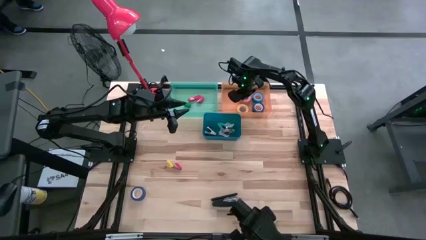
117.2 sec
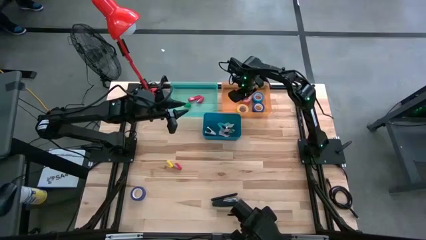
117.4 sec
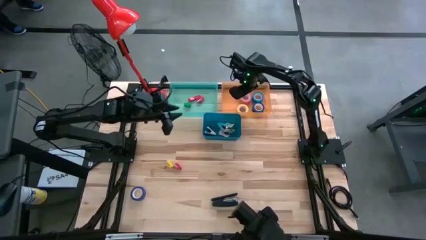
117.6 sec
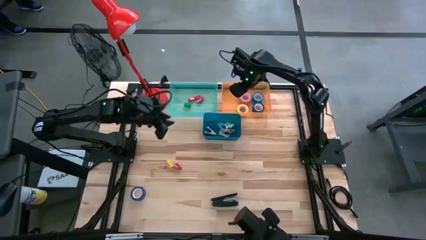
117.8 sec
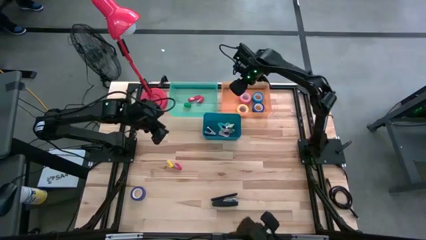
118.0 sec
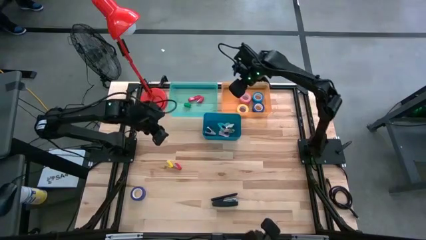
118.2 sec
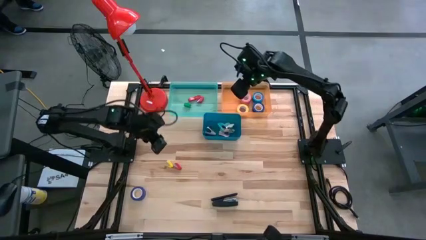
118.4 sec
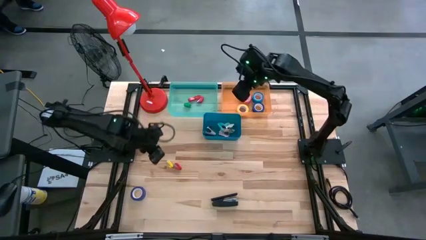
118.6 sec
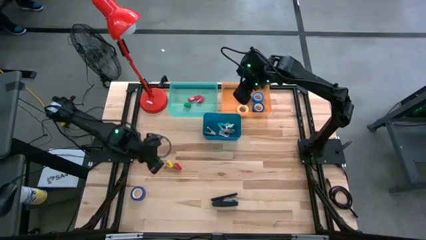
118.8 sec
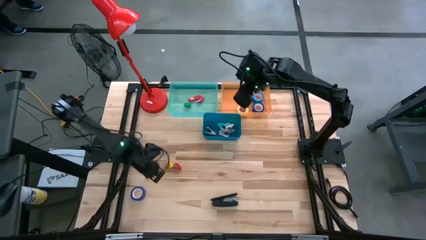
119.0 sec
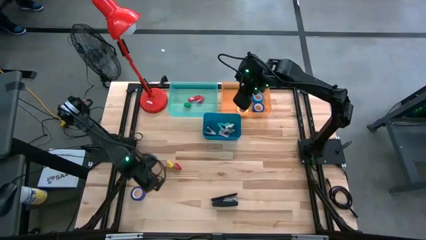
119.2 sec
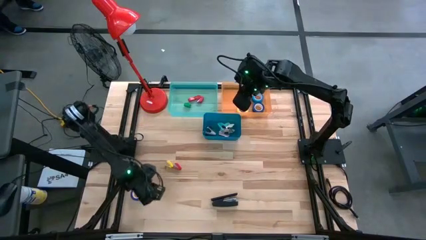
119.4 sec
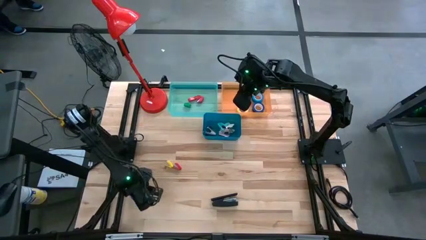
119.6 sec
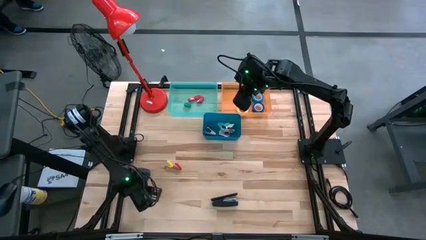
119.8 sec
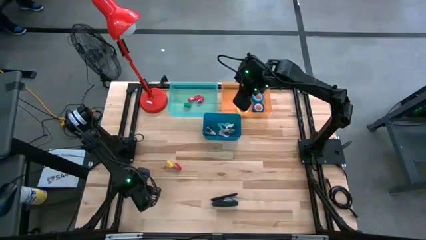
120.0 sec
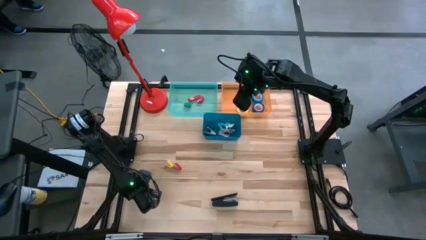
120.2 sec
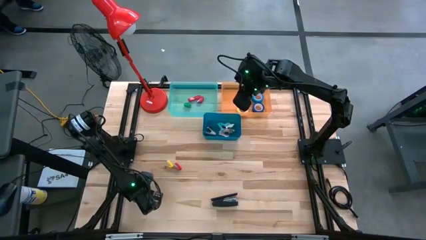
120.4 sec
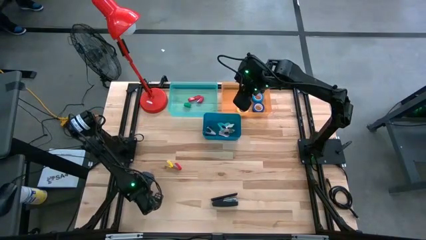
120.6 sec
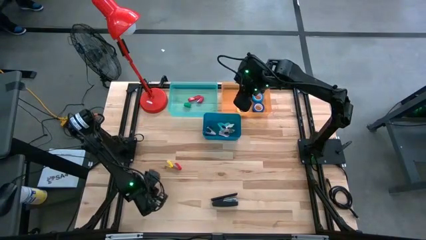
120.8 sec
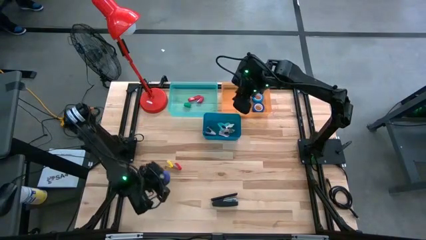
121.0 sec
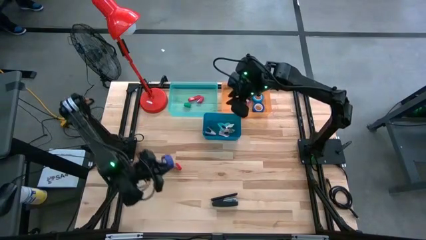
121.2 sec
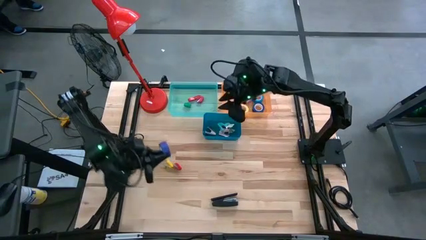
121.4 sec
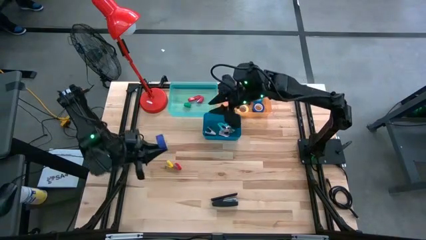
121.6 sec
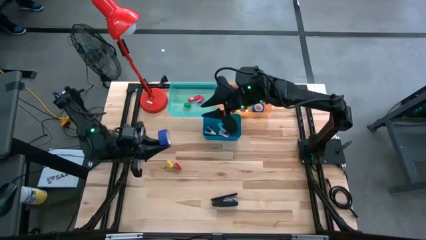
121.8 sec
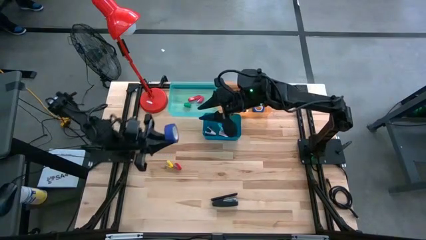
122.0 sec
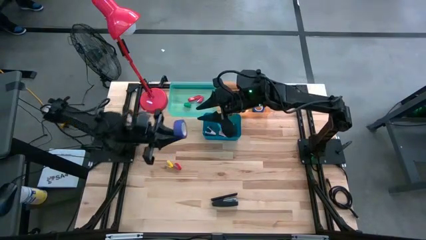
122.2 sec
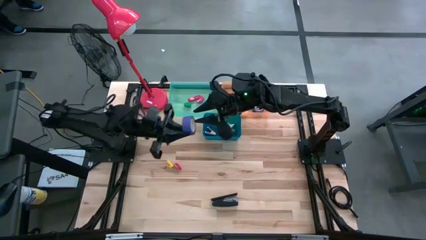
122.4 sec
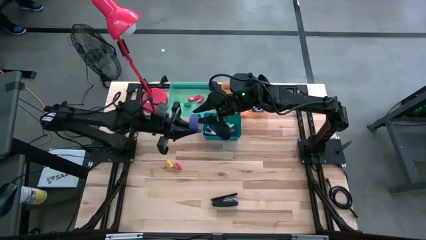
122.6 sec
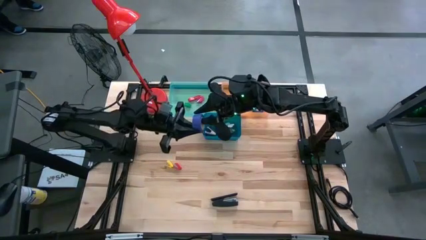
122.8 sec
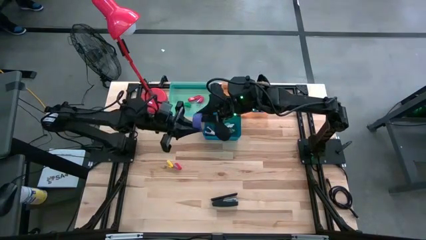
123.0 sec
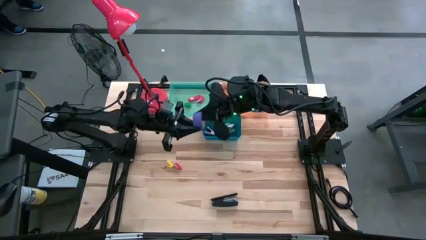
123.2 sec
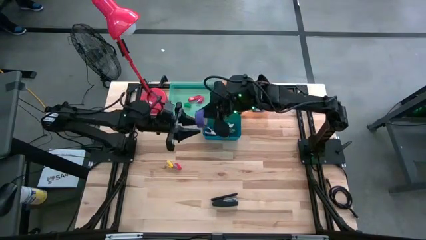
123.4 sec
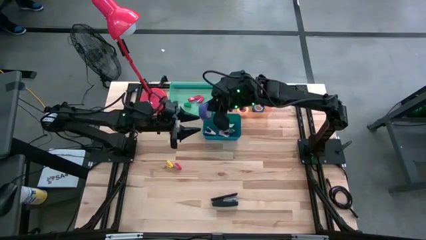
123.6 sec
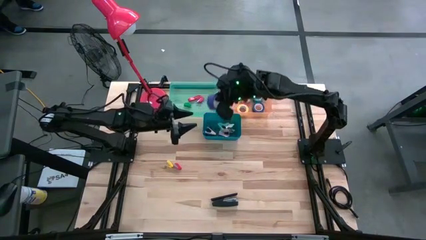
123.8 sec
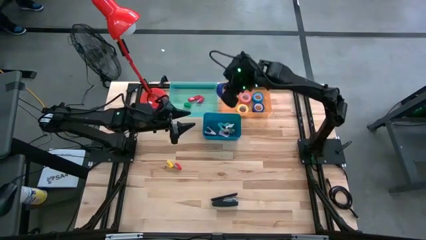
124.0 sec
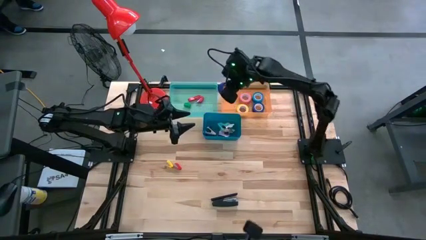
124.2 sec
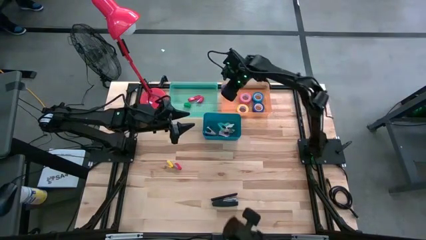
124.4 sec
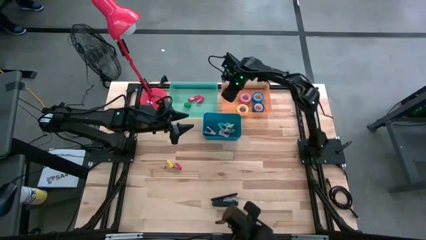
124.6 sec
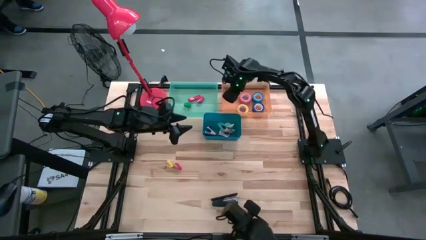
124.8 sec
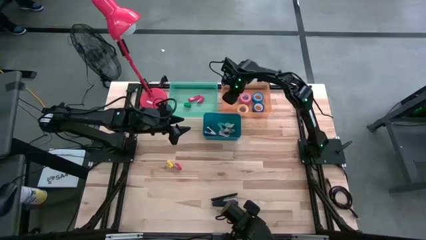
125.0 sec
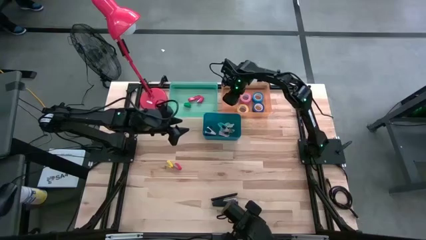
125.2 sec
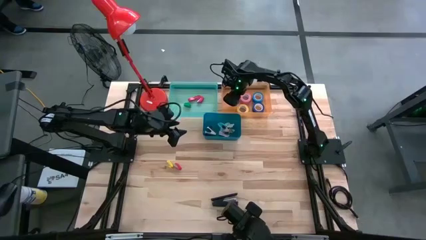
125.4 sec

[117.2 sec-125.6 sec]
Task: Pick and place Stapler, Stapler remover, tape
Put the blue tape in the orange bin

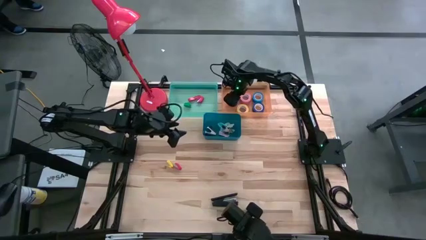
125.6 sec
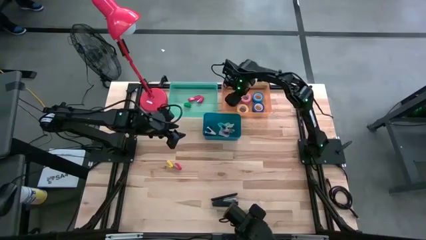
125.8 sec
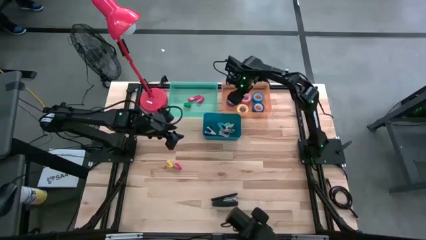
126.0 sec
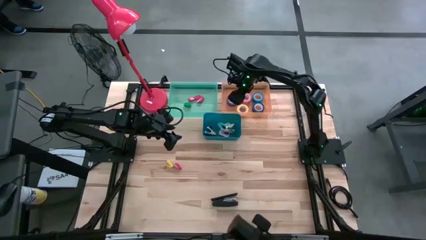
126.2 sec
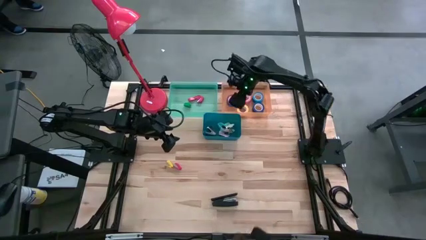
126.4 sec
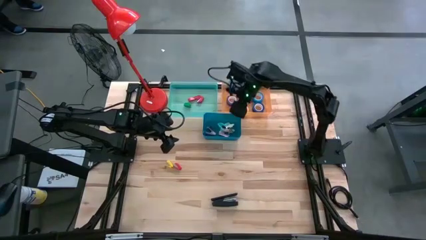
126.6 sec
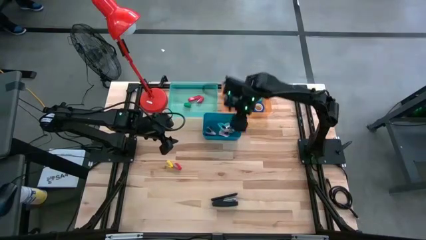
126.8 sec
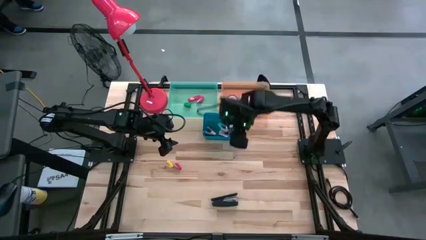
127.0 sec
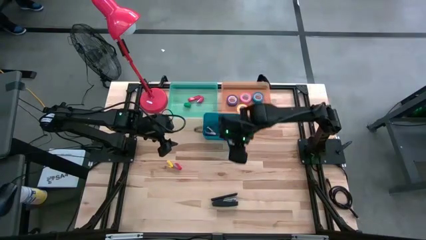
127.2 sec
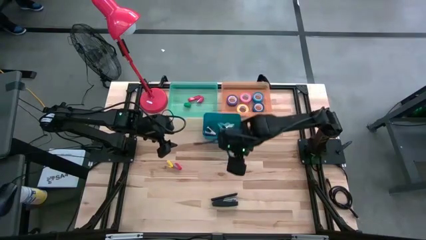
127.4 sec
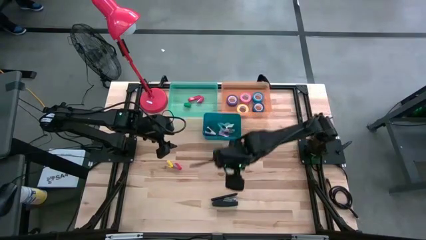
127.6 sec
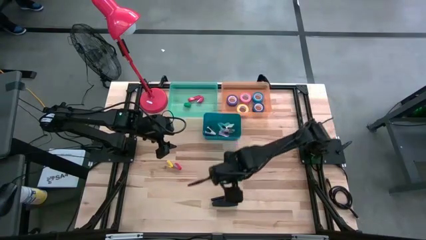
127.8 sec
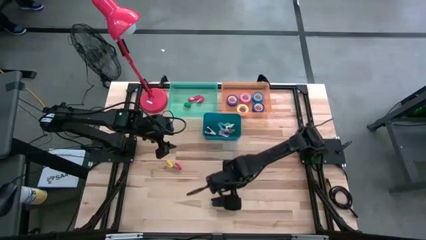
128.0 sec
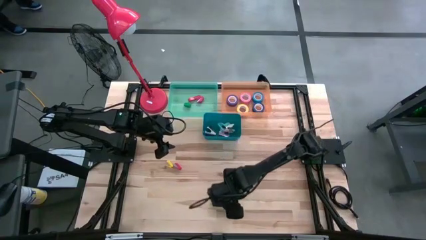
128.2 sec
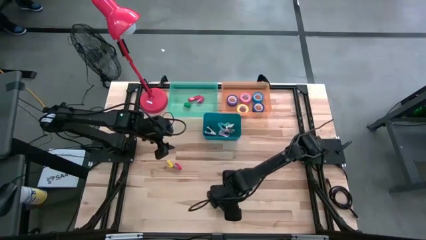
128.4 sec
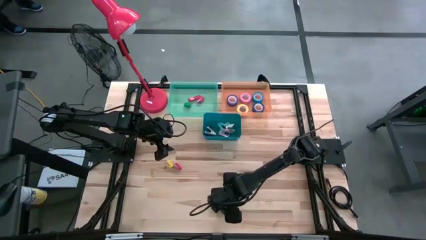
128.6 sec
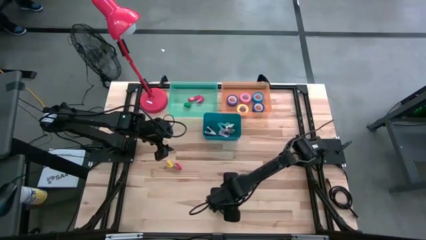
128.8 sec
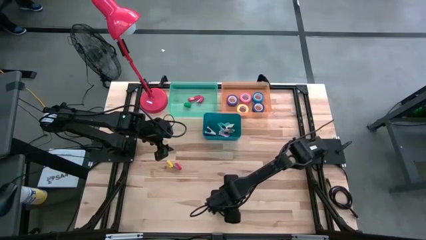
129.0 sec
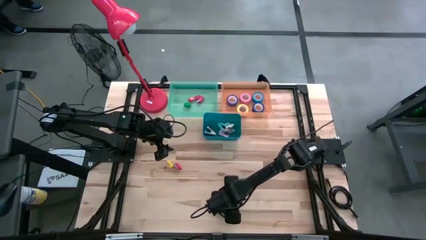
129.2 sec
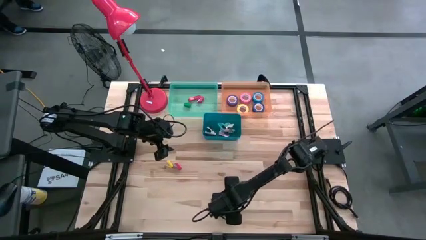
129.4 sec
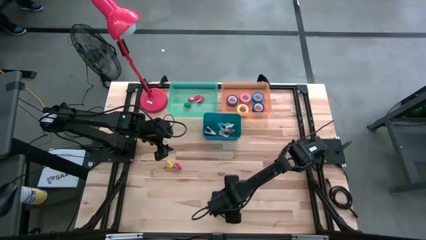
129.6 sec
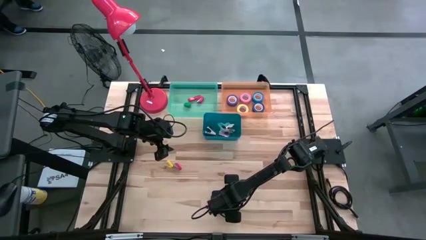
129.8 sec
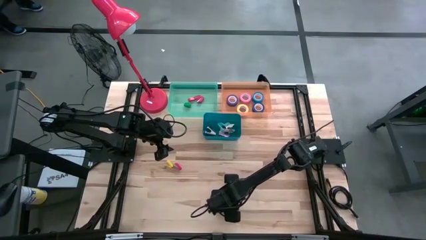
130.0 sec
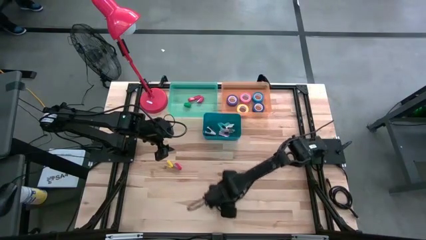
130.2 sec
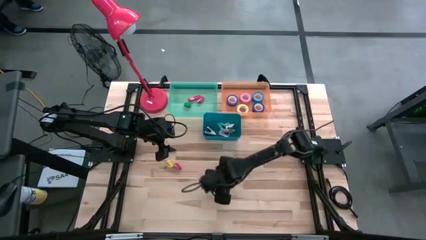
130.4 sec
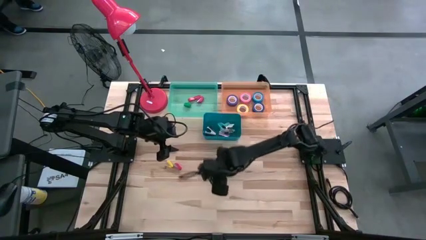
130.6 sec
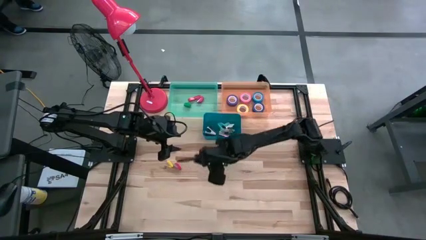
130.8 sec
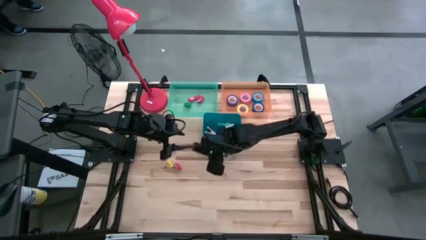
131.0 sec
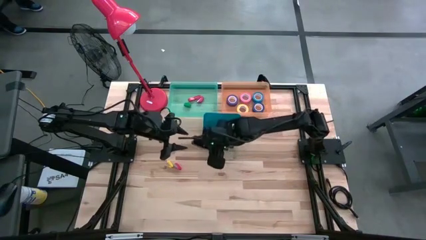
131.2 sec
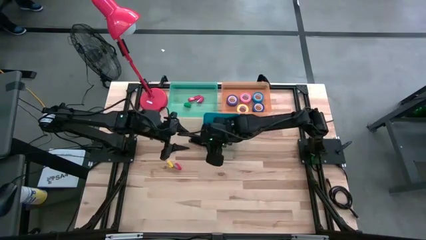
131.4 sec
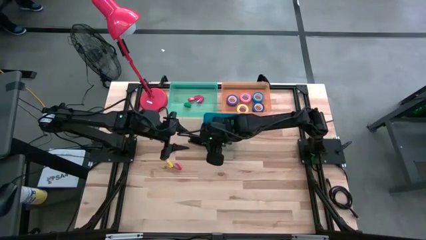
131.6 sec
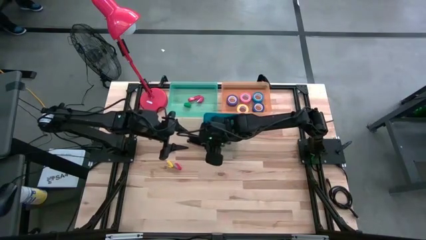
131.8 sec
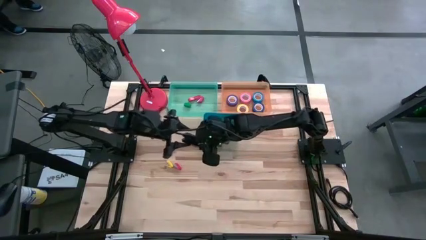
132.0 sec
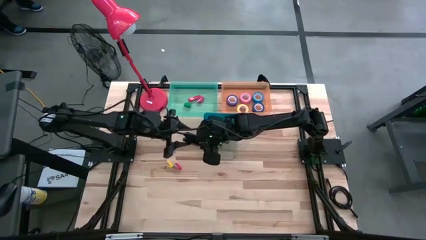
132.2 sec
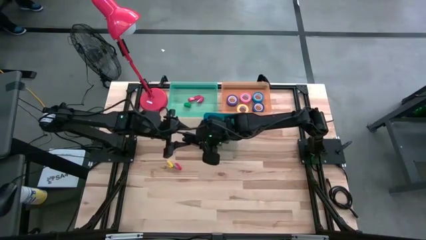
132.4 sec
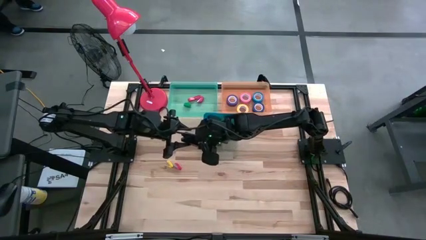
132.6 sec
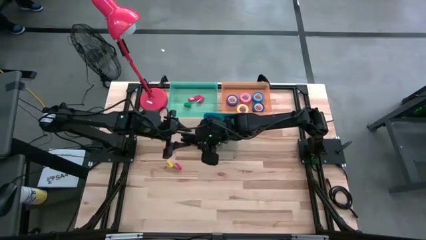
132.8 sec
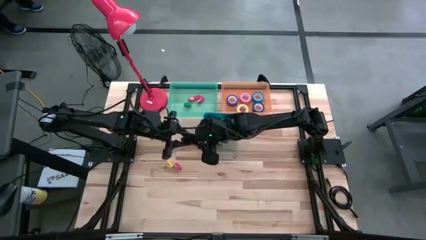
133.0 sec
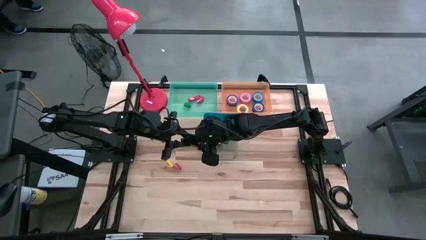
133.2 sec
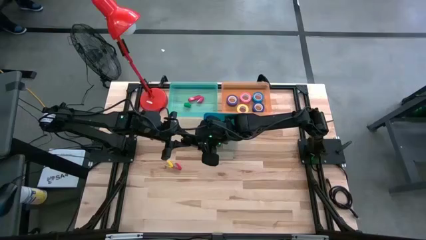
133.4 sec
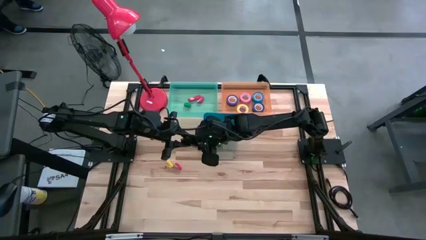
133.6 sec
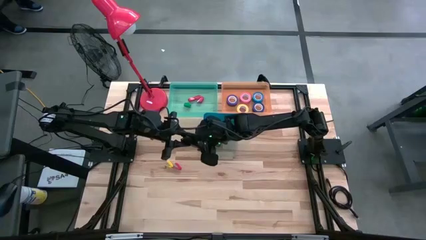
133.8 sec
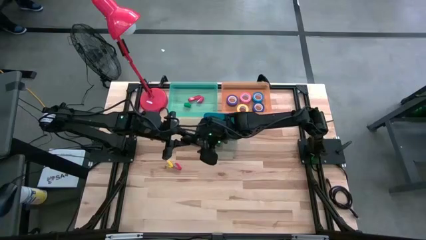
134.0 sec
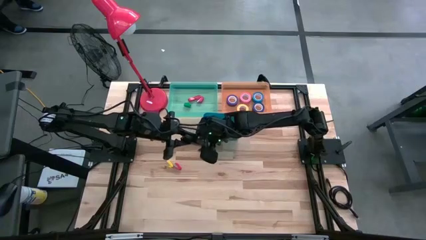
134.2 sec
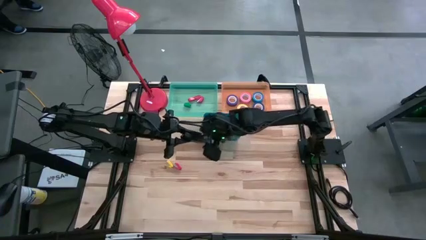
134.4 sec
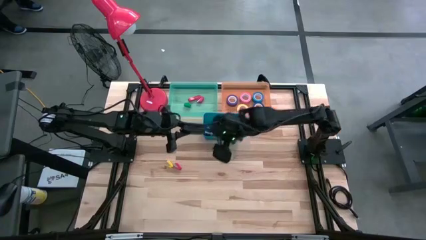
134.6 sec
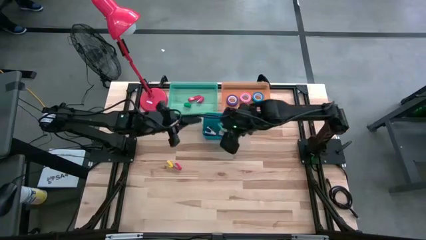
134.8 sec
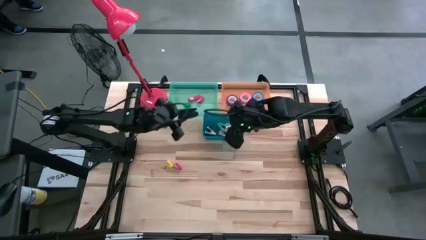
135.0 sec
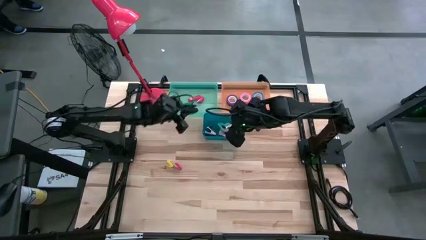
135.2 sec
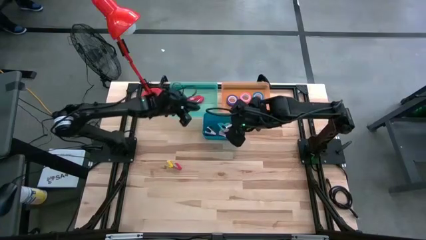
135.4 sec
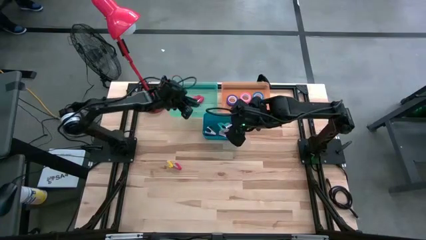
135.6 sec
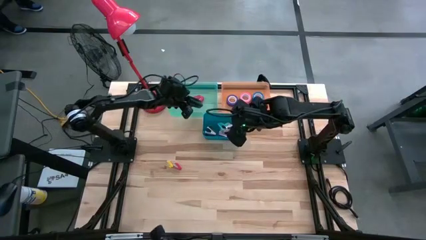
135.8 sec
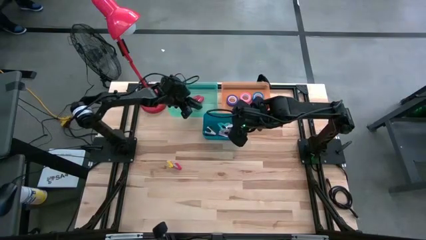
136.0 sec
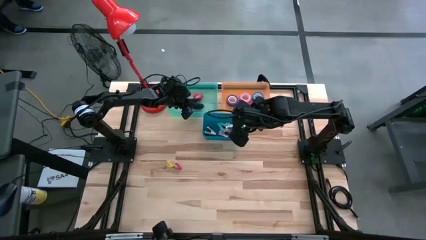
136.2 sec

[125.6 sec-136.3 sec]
Put the black stapler into the green bin
